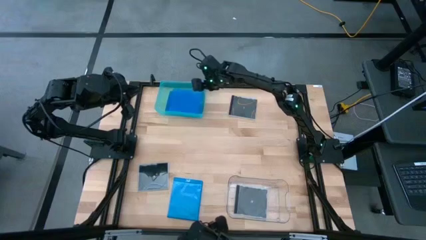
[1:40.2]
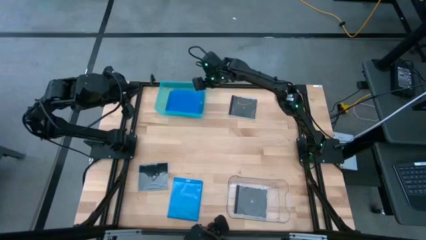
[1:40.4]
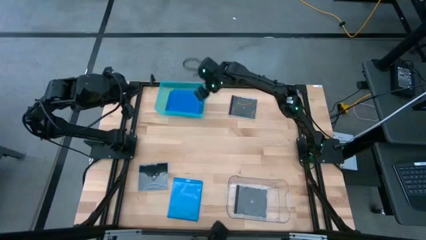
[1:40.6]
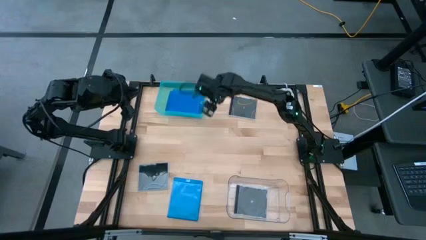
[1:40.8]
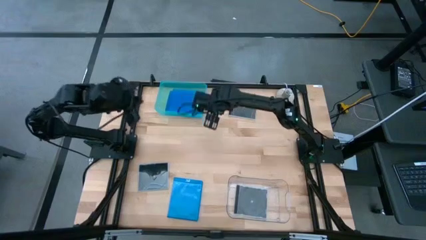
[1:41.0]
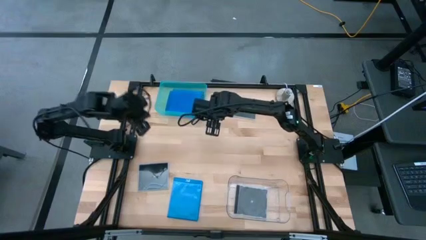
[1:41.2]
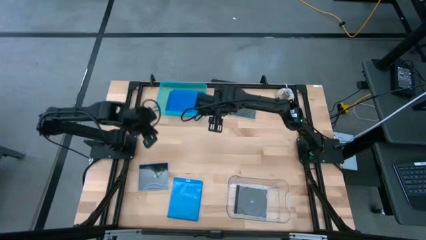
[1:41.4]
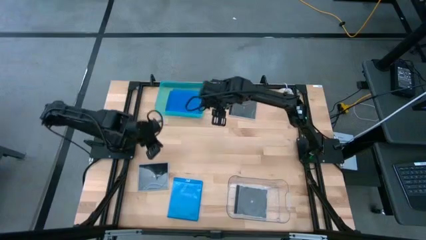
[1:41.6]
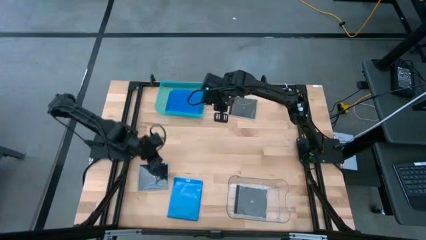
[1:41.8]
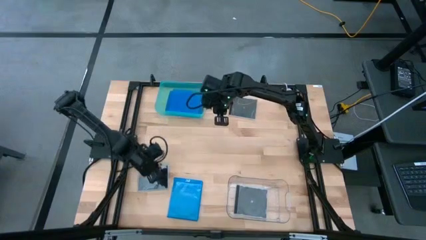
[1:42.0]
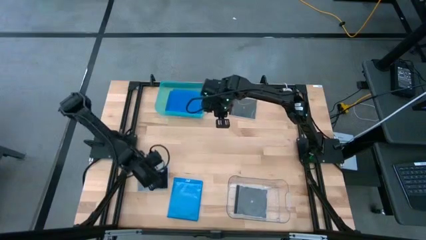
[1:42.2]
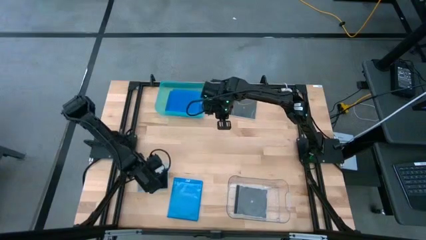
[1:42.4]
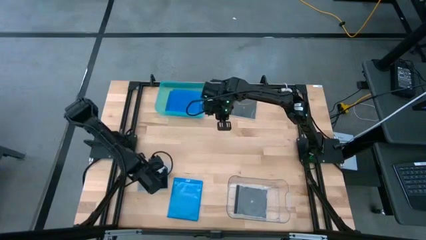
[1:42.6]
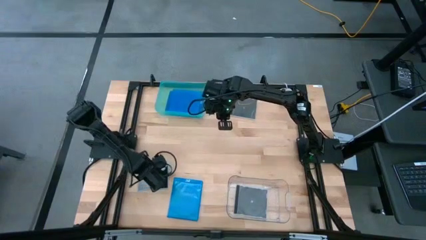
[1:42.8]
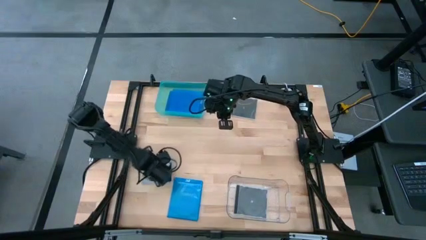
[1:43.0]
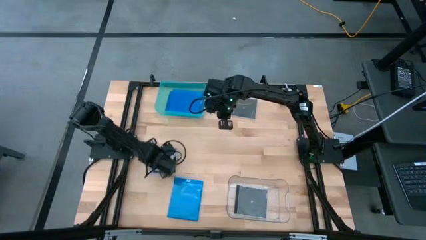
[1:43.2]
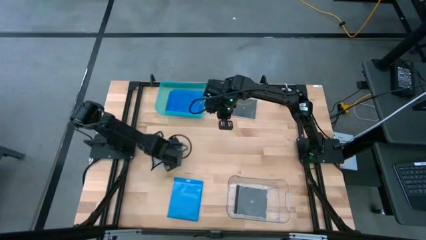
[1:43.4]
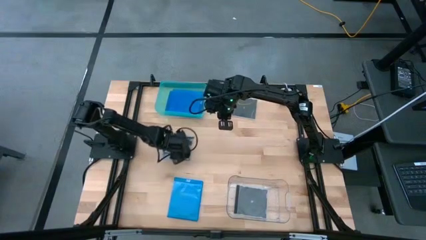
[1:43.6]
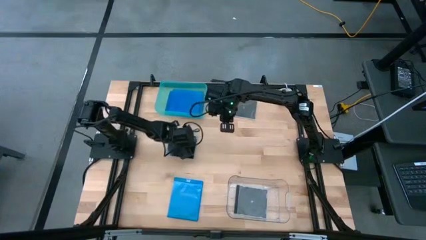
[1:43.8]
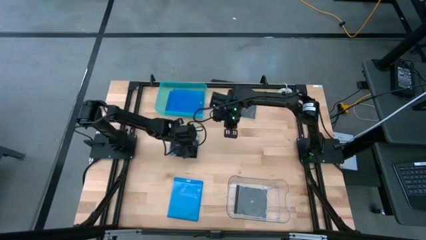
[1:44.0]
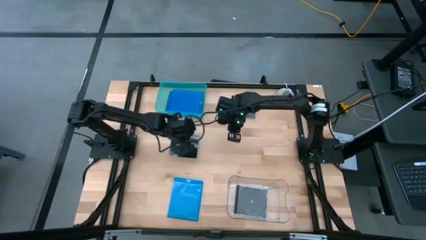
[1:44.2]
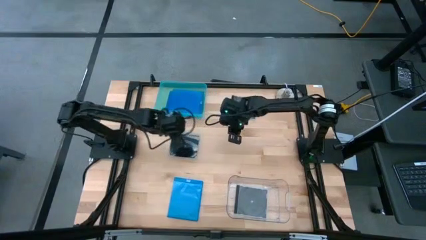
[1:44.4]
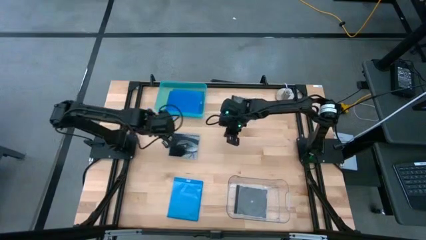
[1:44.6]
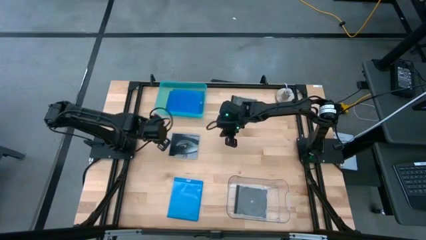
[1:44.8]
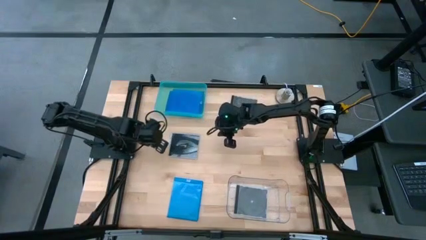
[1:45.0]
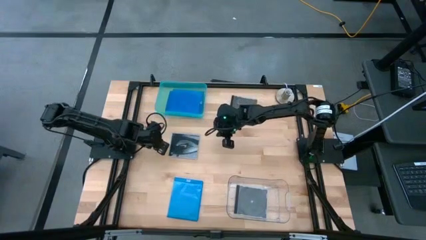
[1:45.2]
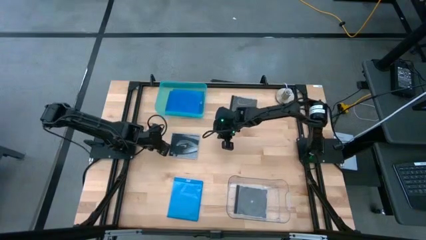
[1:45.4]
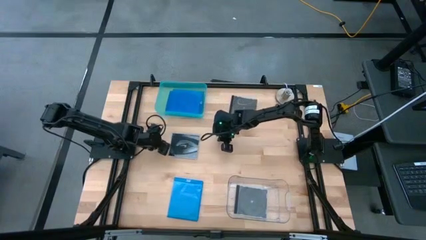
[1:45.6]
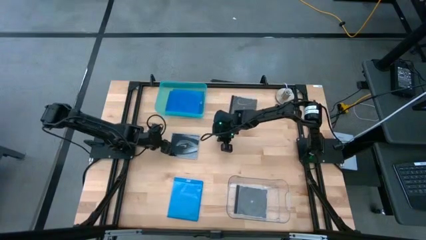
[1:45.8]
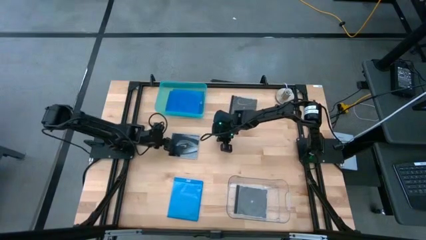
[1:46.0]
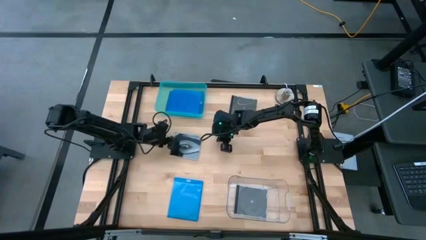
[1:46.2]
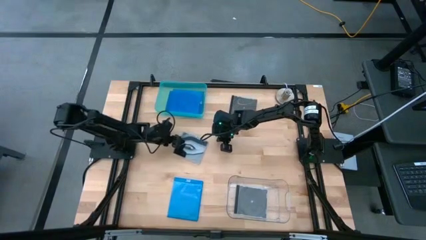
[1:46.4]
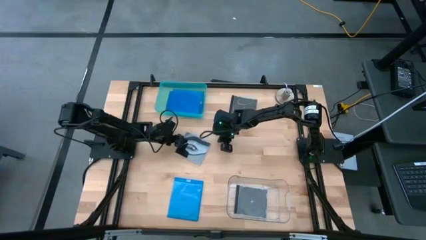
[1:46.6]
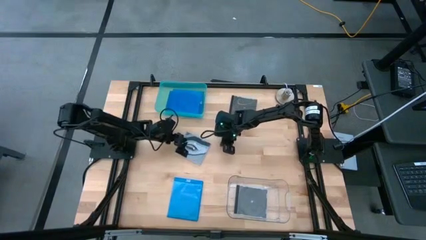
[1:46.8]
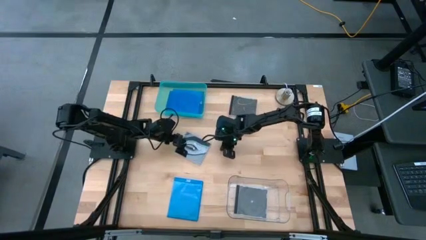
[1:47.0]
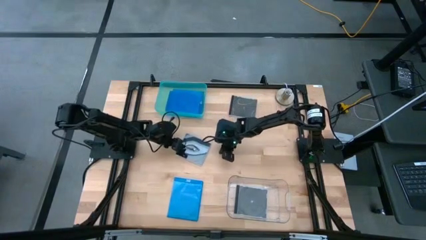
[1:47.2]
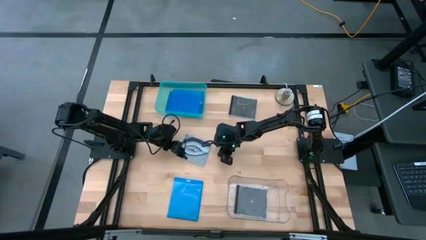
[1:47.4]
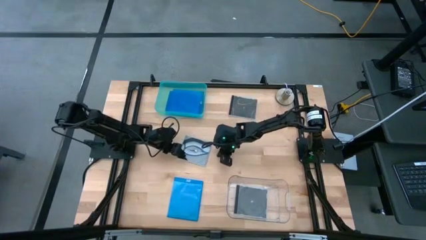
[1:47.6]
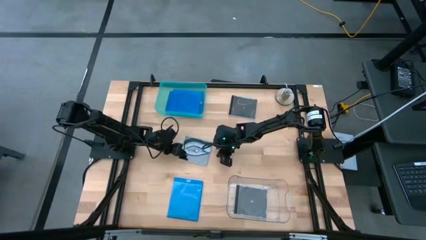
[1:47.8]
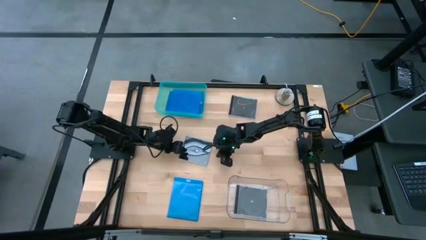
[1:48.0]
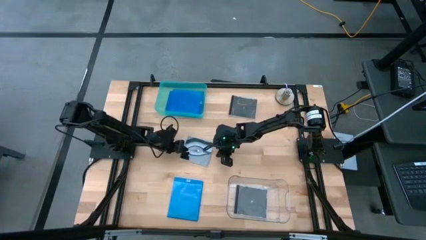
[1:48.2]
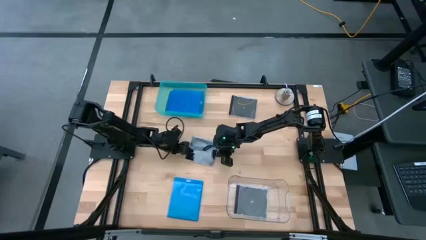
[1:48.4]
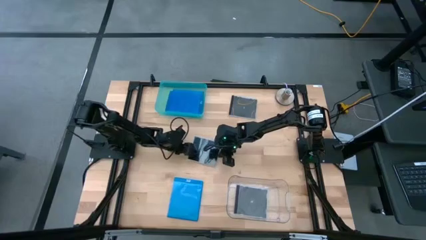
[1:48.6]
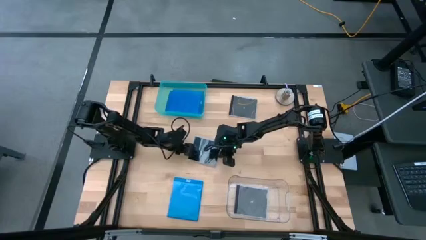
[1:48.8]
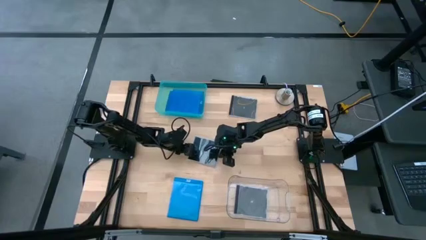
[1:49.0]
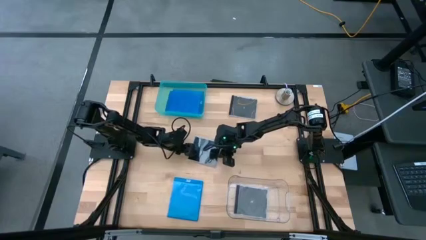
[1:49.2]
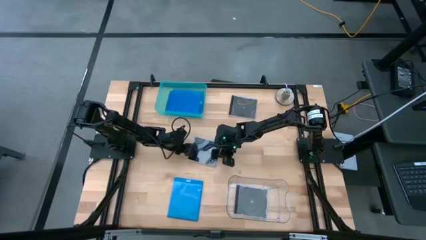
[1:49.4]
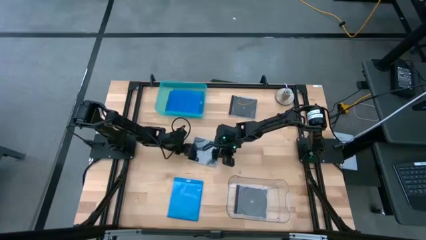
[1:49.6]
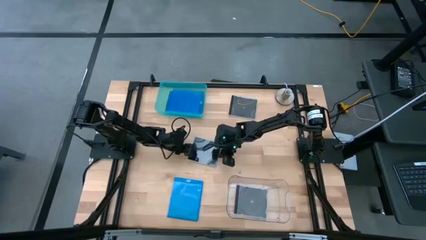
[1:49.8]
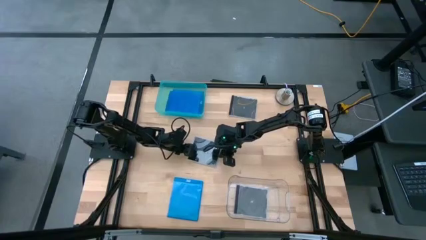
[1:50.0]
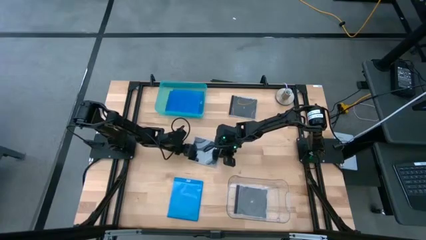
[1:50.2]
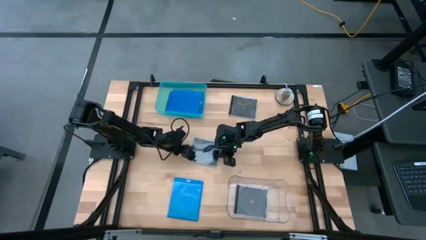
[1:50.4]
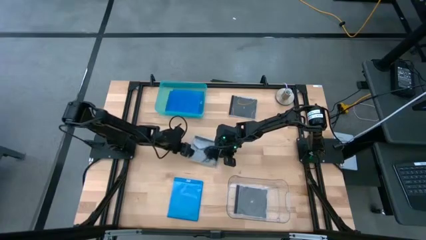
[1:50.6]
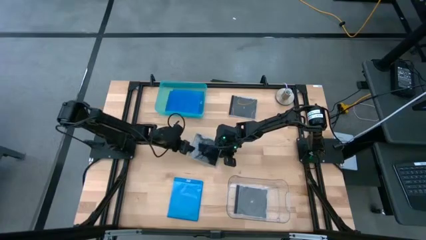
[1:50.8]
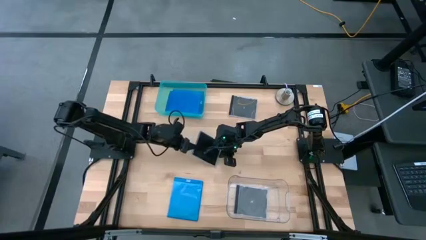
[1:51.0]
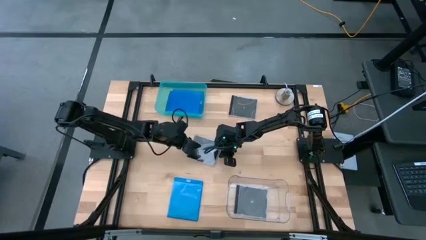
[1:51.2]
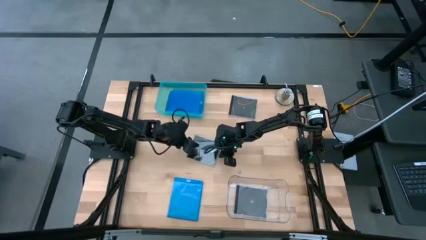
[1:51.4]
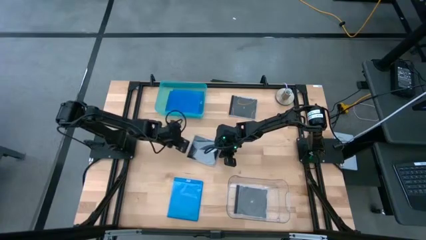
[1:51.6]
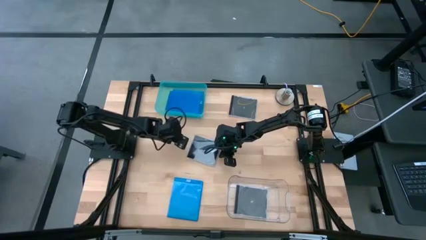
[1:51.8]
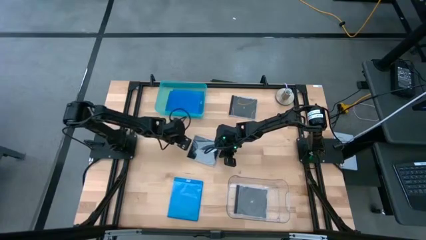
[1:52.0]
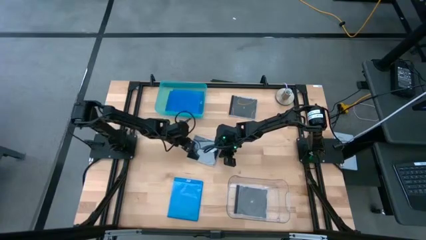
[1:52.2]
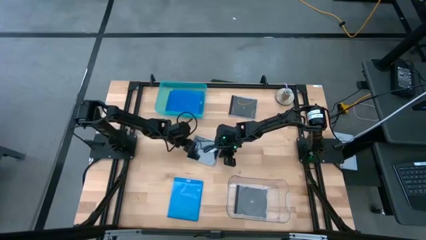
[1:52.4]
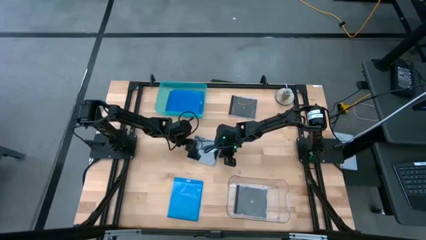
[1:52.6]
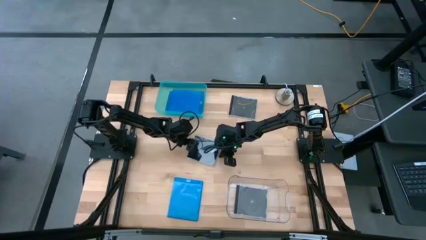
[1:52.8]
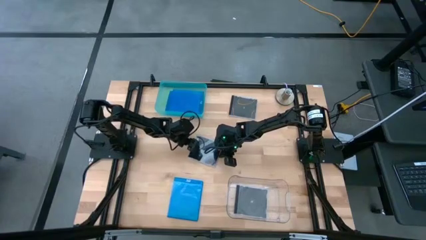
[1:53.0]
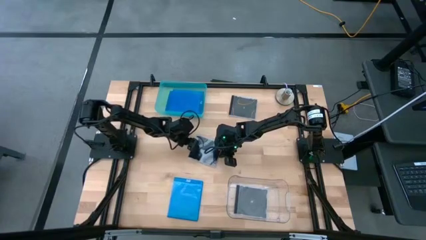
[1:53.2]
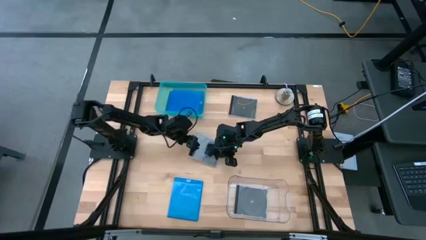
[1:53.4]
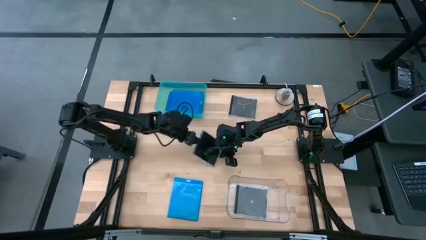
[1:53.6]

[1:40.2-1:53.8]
Task: Pick & place jewel cases by type
Put the bottom black CD case into the transparent bin

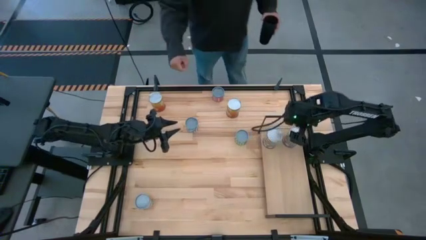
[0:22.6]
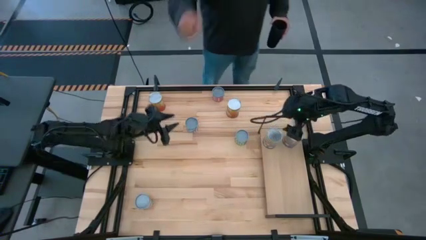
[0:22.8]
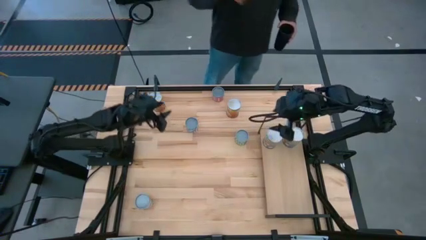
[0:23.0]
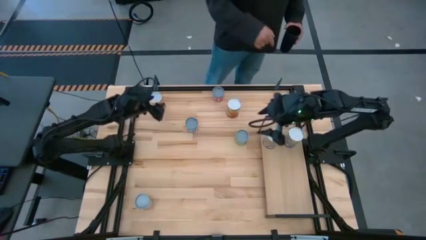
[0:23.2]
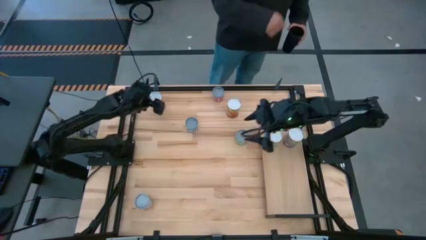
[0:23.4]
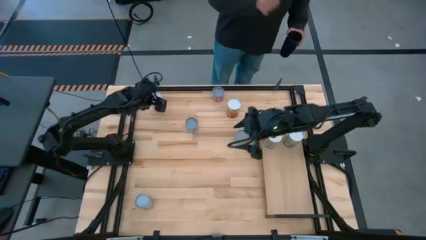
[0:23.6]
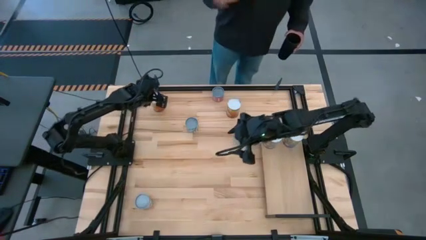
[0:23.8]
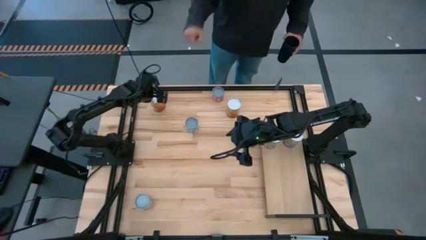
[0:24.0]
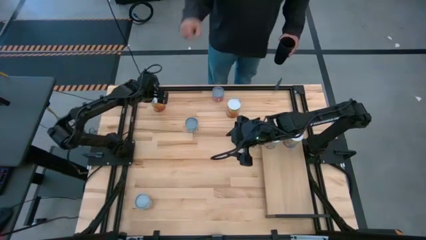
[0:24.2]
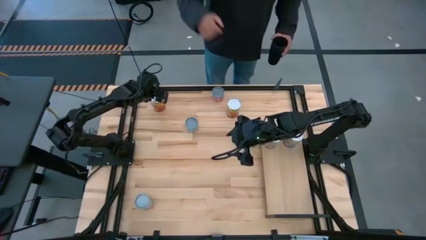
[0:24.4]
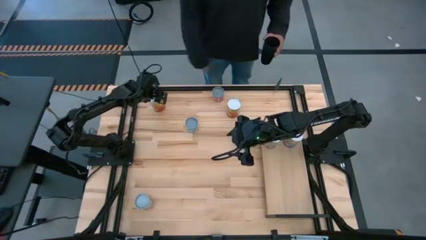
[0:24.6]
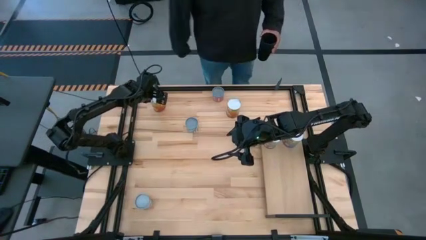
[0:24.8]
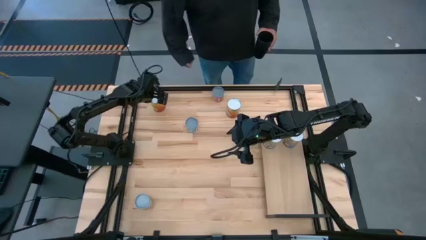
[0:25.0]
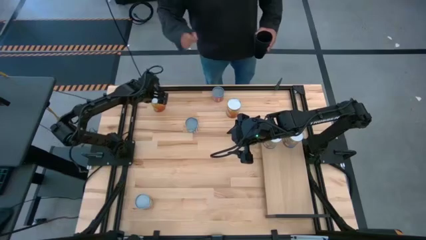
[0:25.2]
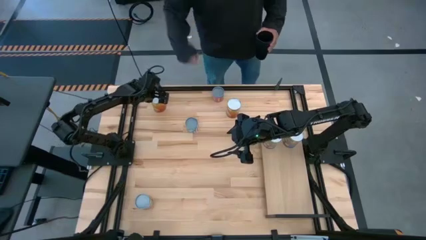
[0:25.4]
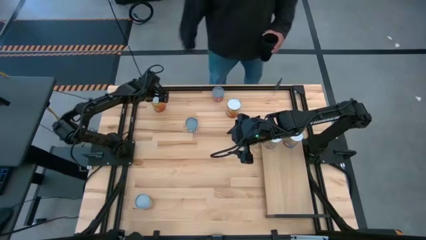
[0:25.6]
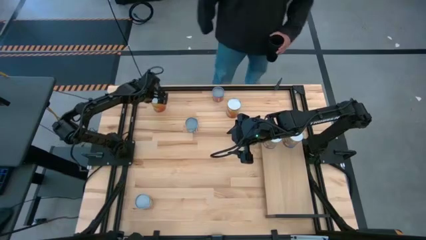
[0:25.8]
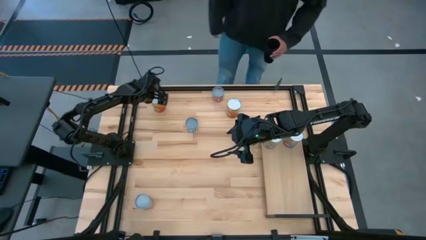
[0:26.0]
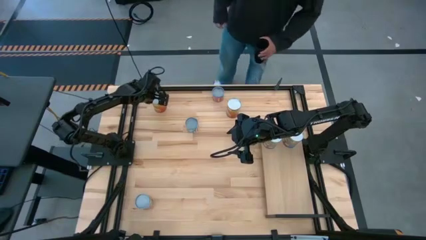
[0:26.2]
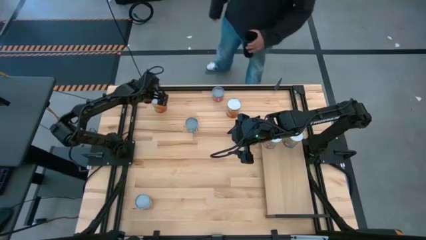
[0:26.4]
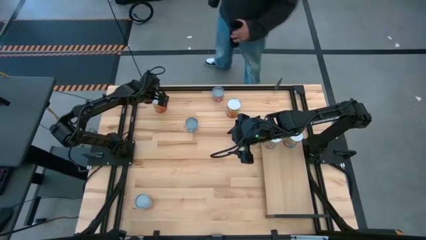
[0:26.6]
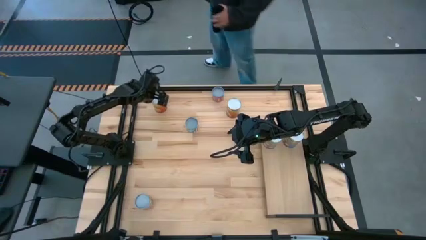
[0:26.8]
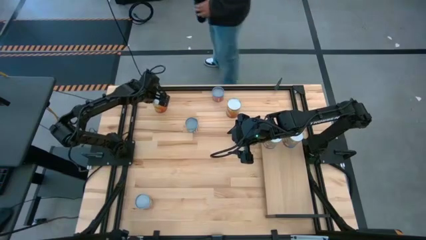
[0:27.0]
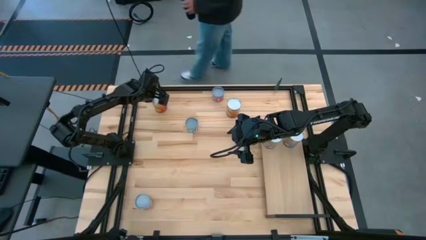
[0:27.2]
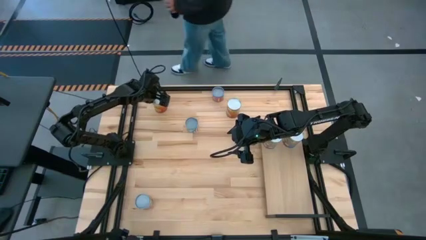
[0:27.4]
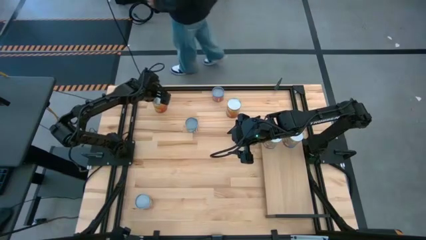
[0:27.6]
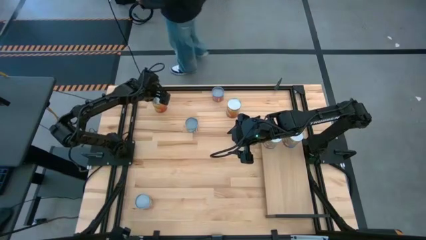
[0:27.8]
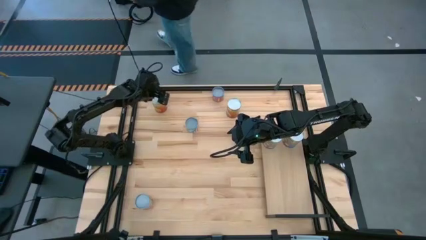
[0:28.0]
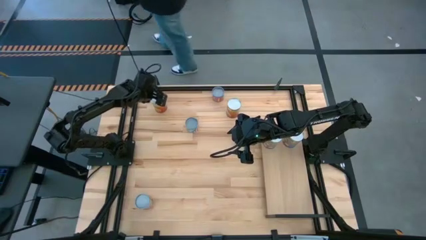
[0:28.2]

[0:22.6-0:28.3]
Task: Pick and place cans onto a shelf
Put left the canned corn on the shelf
